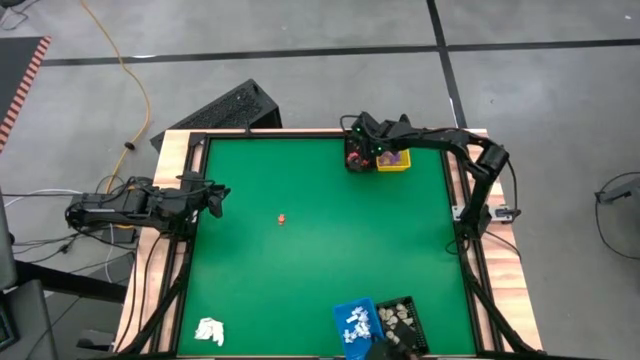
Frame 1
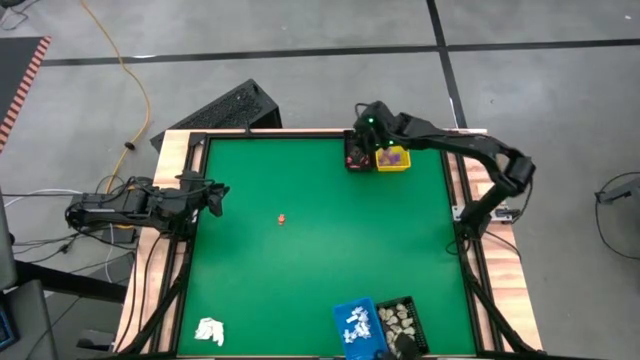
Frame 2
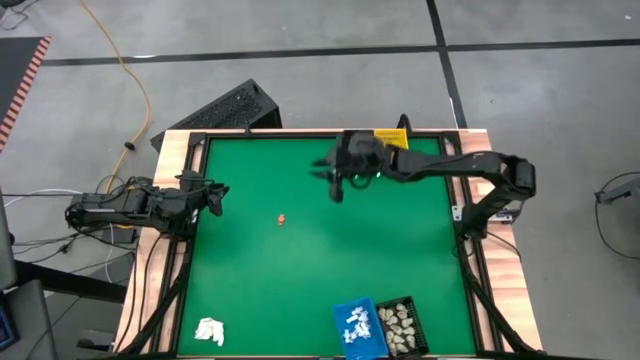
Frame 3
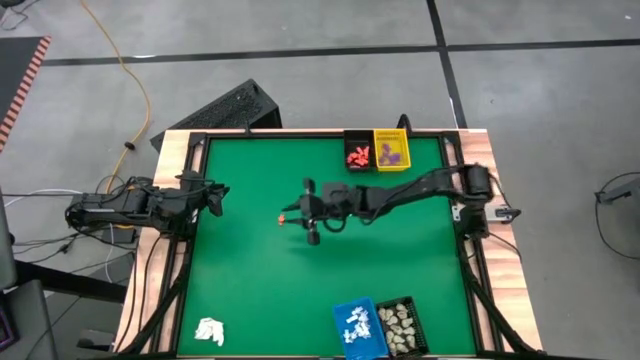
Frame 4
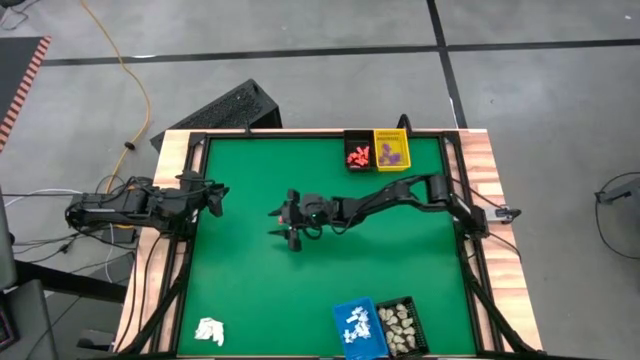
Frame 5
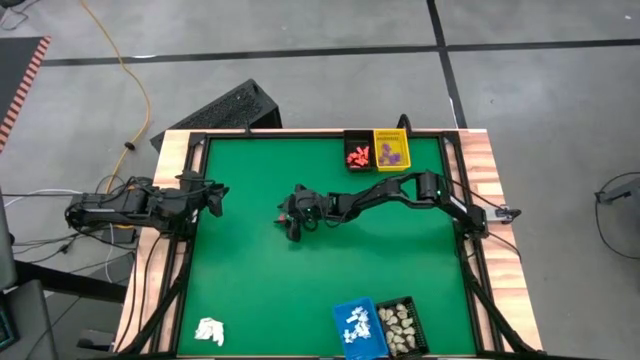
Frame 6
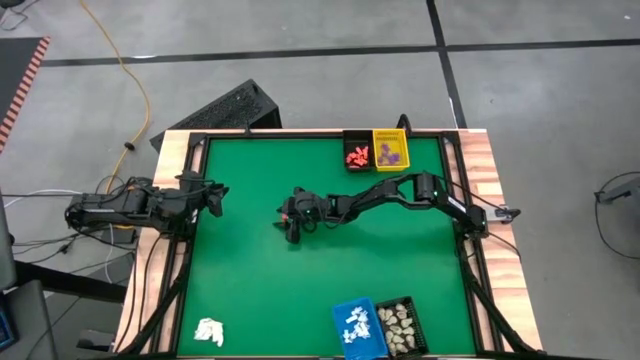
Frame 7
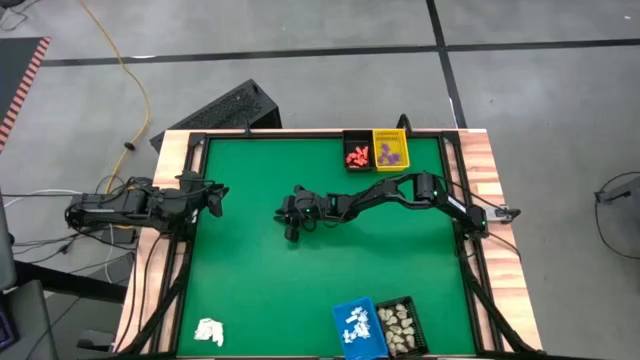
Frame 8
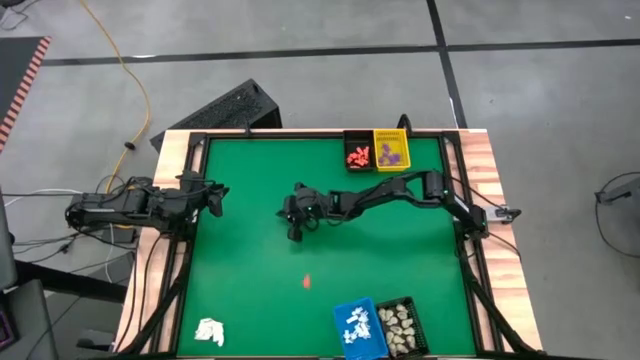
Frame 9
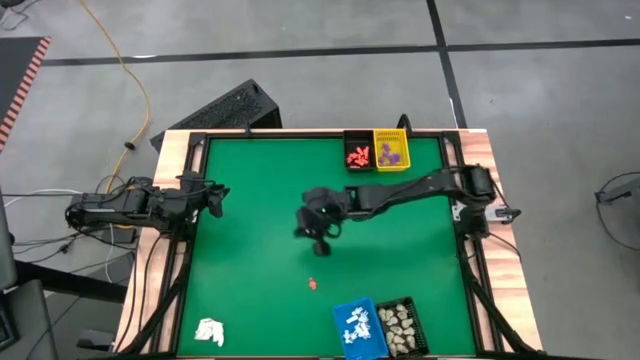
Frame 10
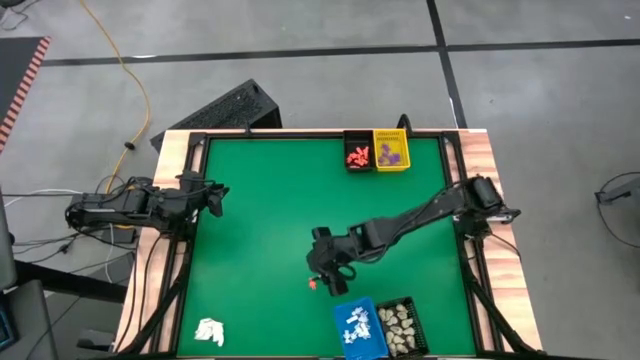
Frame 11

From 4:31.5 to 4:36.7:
Task: Sort Halloween decoration
Put the orange skeleton toy into the top black basket

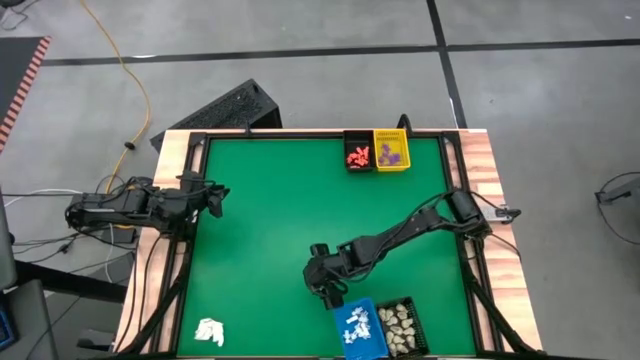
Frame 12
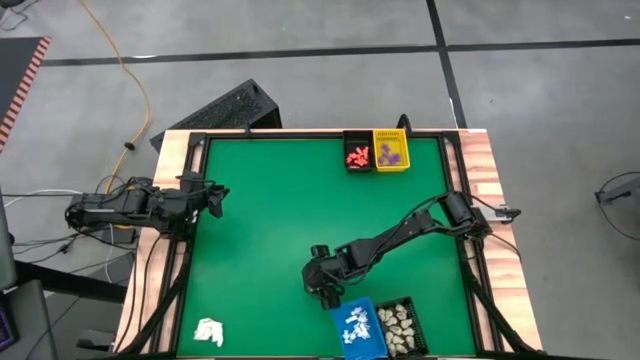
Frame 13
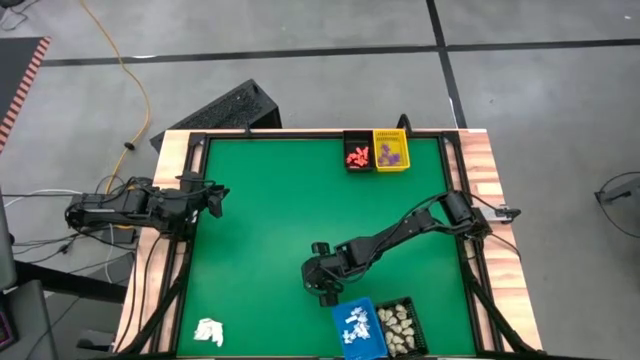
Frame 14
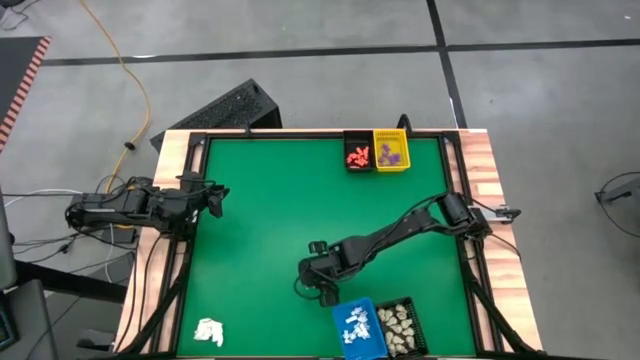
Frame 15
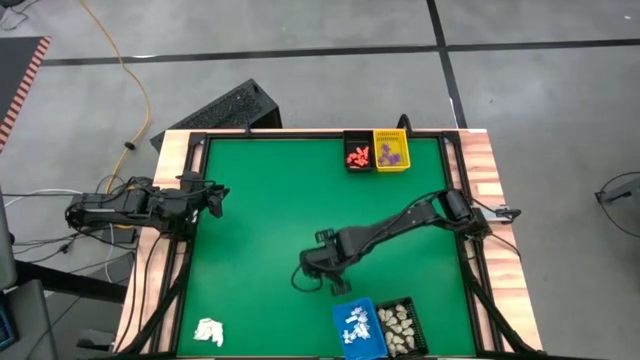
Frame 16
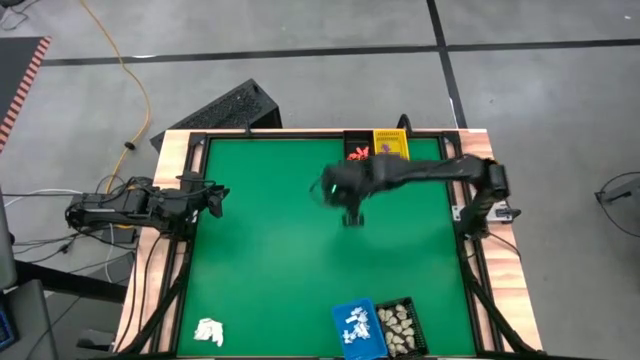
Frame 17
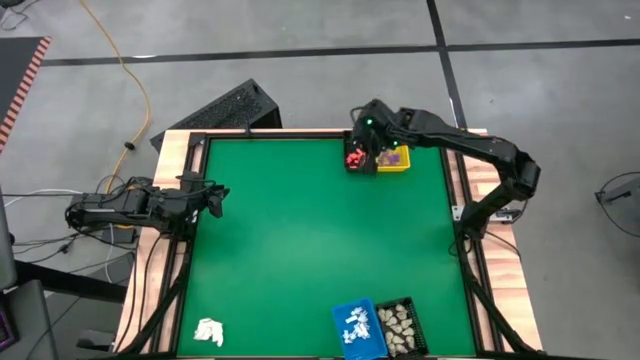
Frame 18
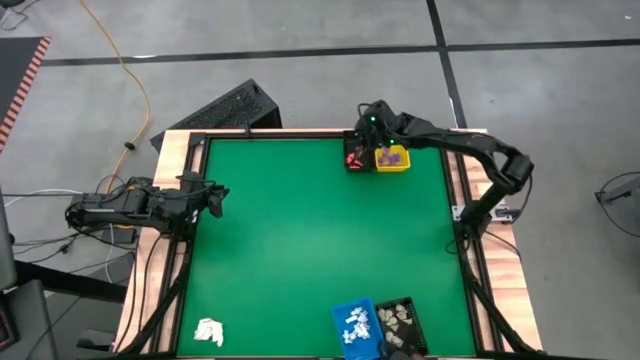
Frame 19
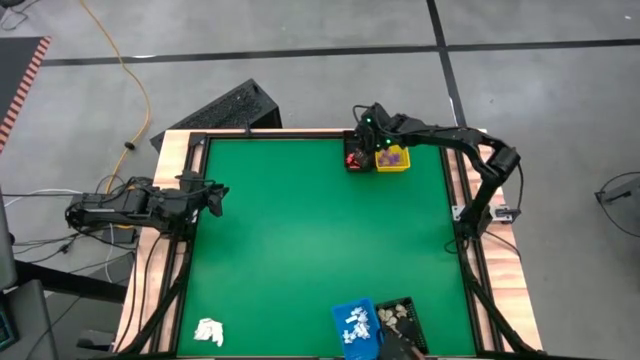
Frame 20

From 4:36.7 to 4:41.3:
Put the orange skeleton toy into the top black basket

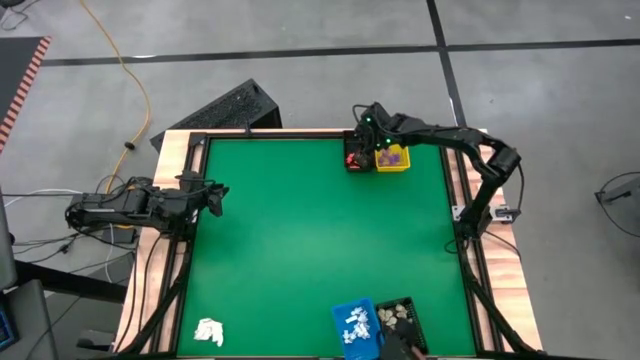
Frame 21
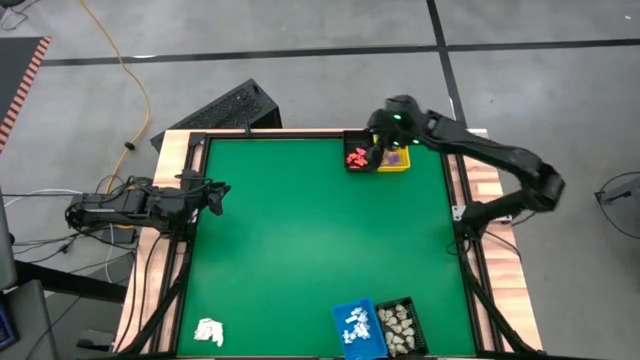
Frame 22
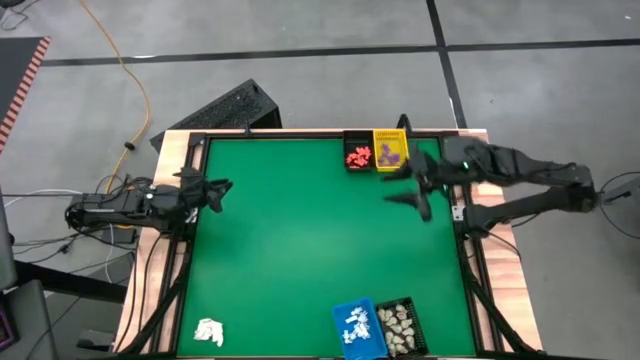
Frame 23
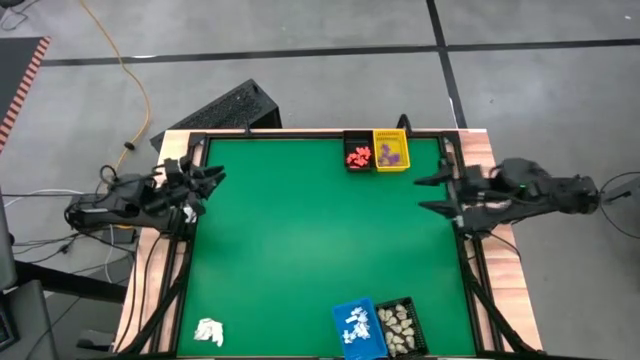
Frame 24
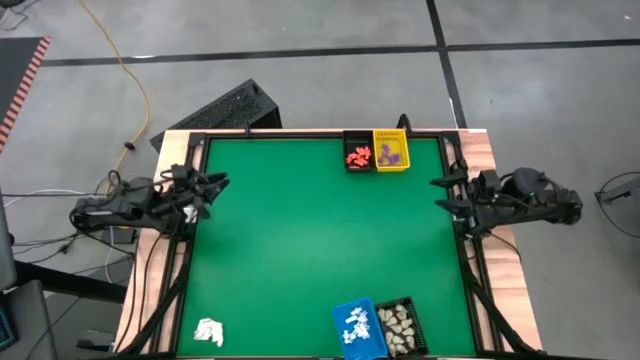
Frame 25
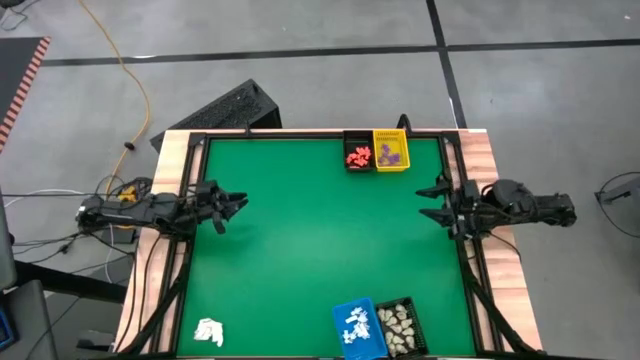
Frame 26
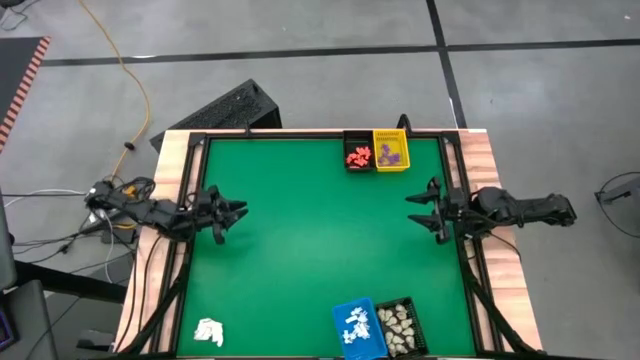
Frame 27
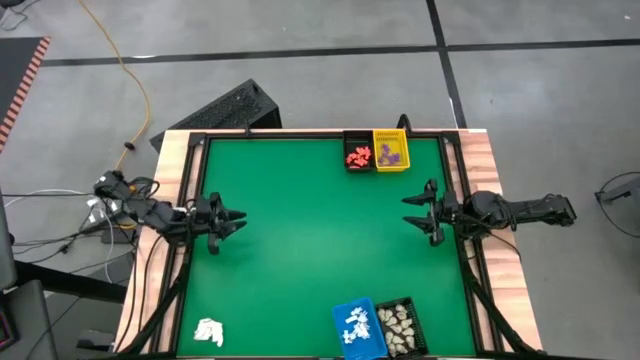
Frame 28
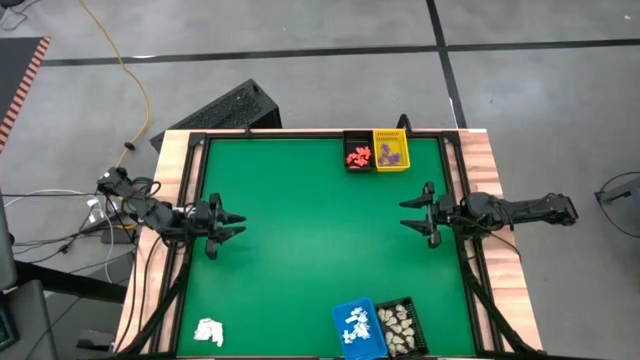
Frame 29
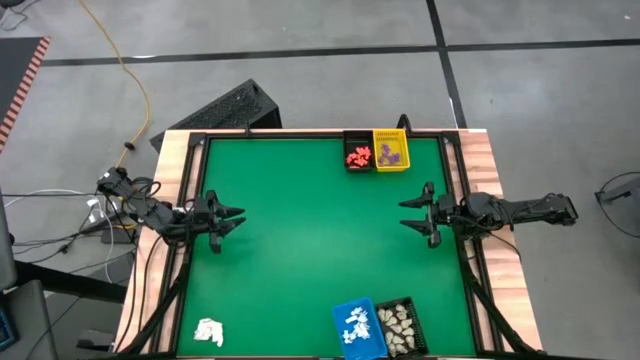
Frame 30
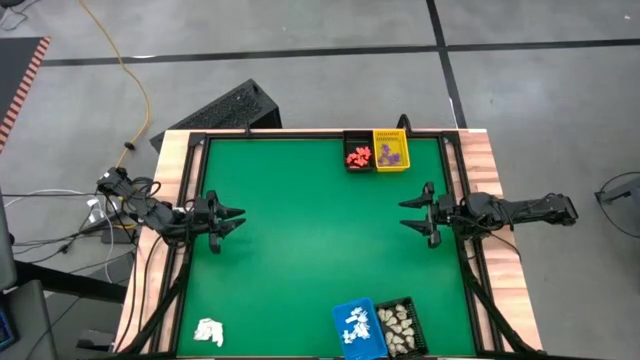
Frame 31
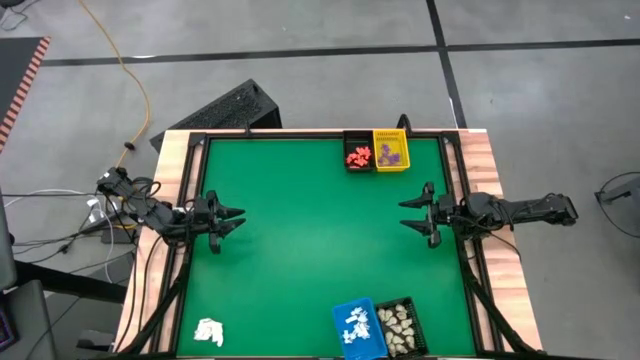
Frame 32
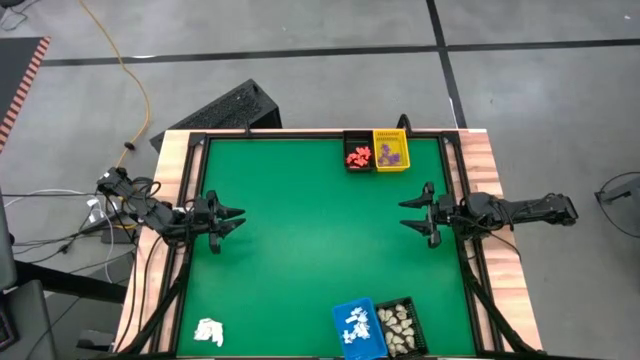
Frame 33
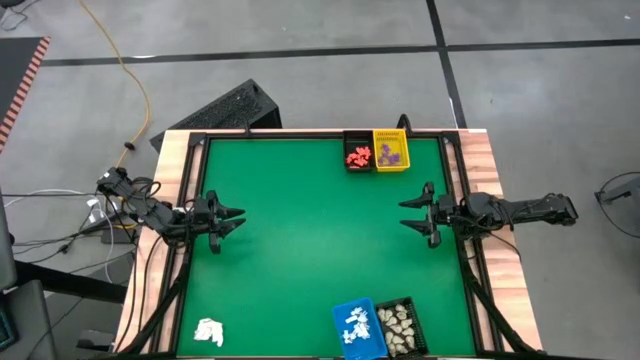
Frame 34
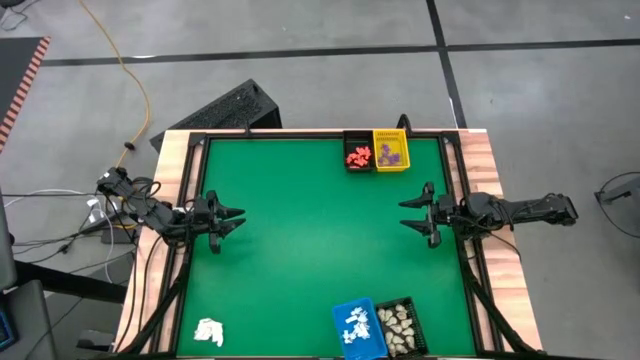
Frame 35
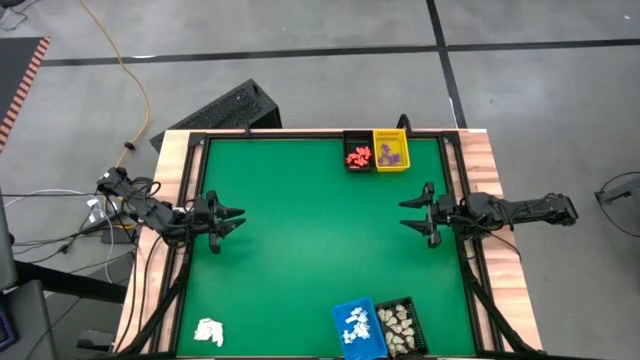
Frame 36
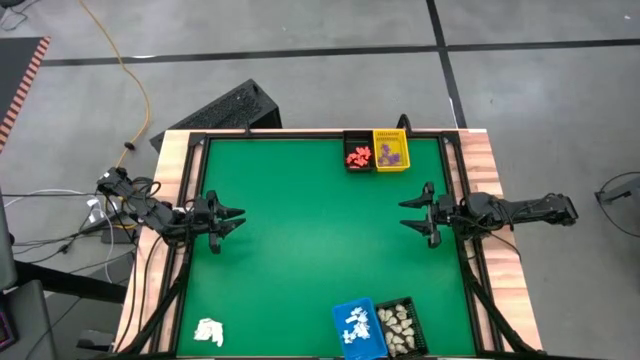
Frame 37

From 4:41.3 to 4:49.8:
Return to Home Position

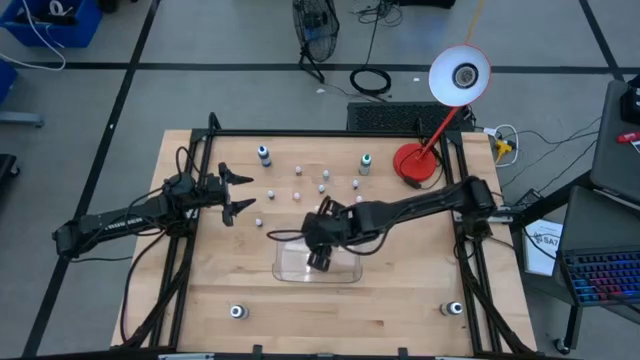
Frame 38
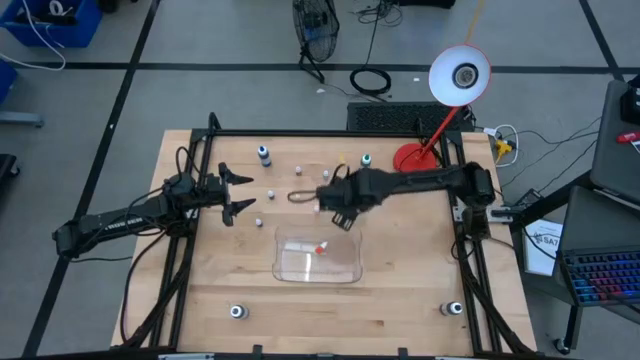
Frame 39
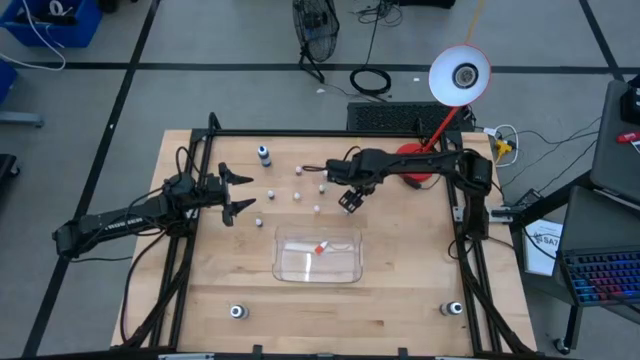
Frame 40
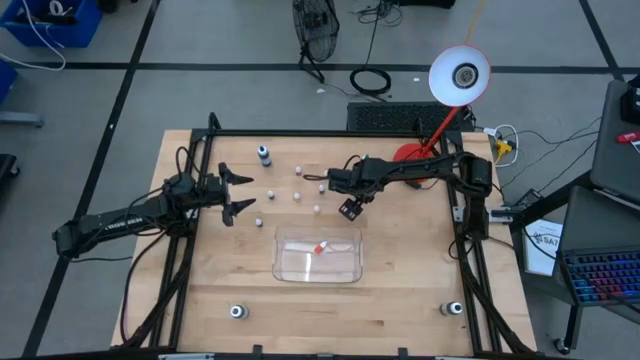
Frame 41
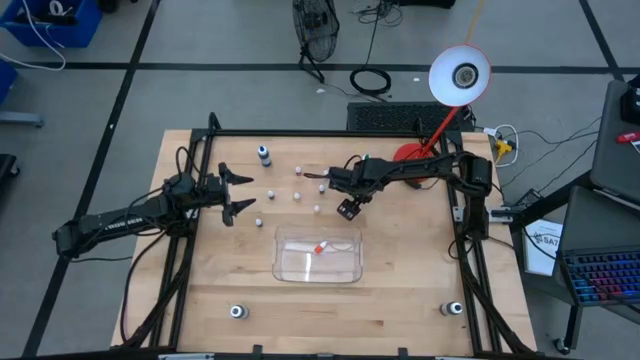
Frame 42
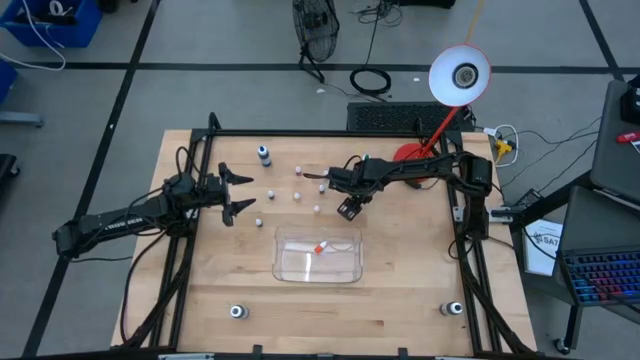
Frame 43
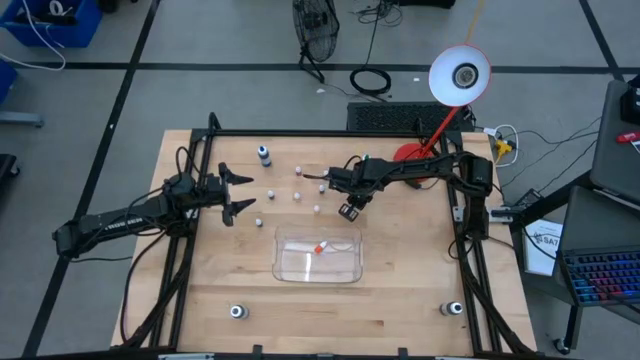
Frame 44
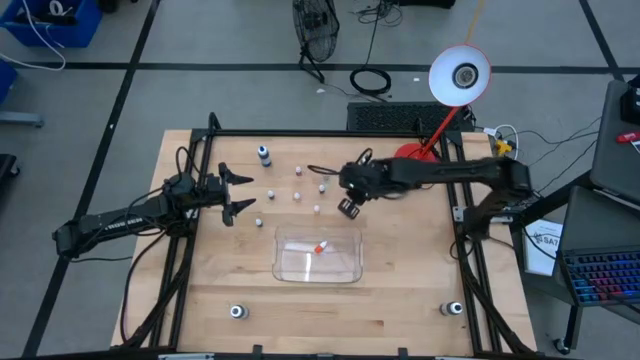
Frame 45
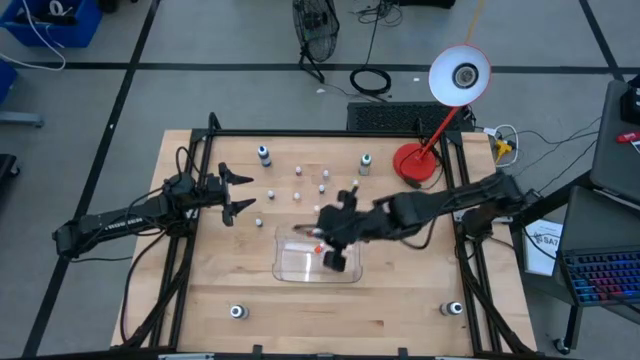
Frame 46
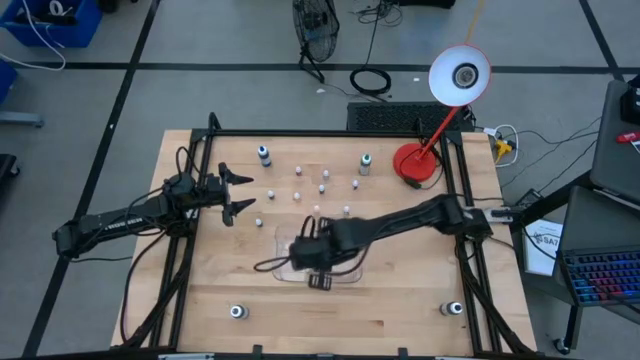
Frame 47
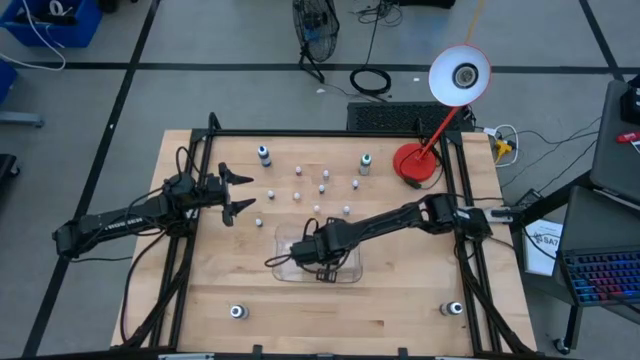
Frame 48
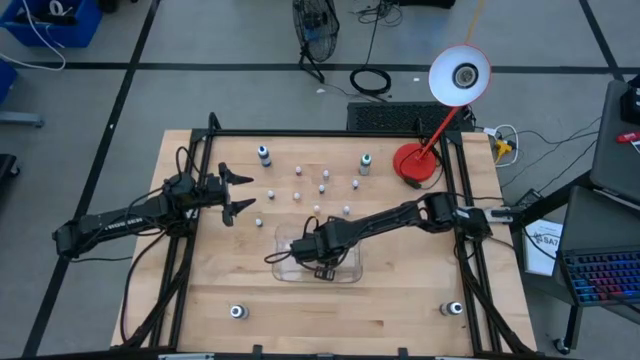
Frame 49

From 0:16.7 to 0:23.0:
Task: Pick & Place food coloring
Put the small orange food coloring bottle into the transparent bin
